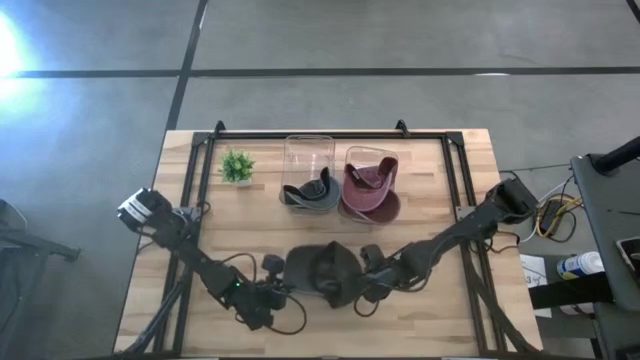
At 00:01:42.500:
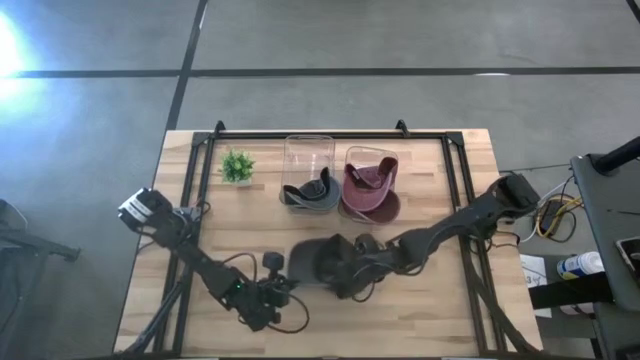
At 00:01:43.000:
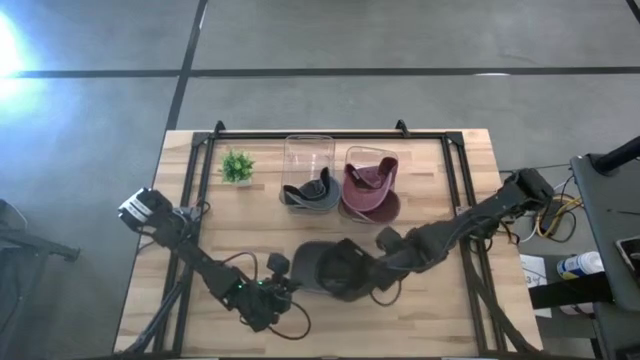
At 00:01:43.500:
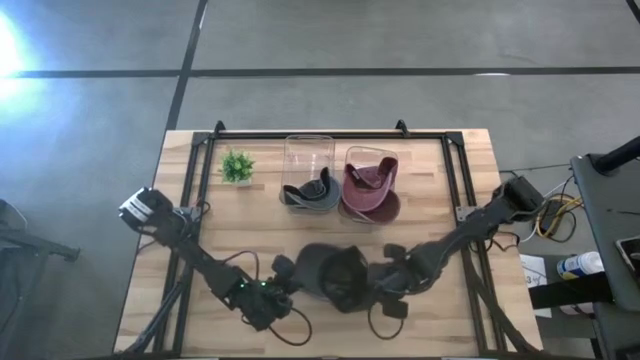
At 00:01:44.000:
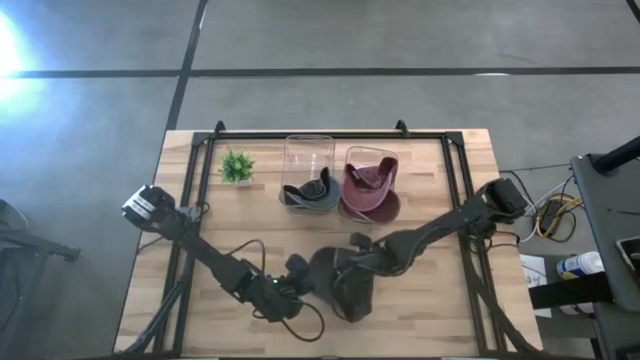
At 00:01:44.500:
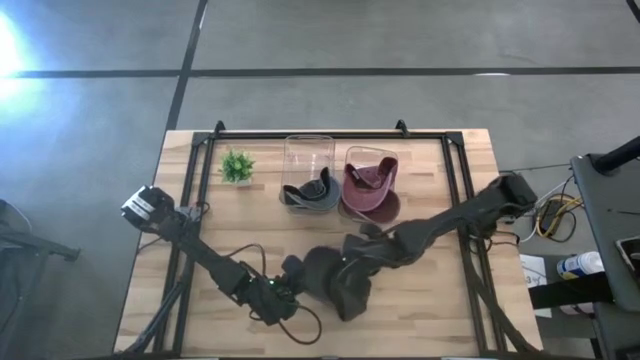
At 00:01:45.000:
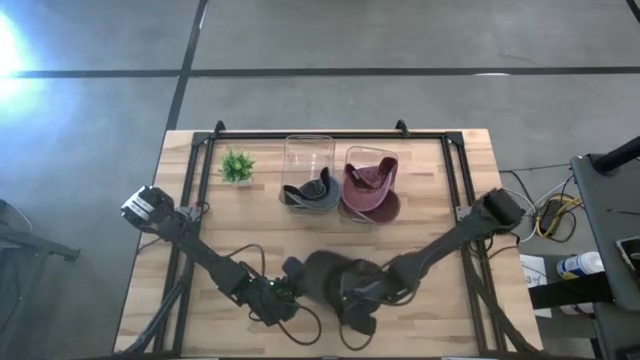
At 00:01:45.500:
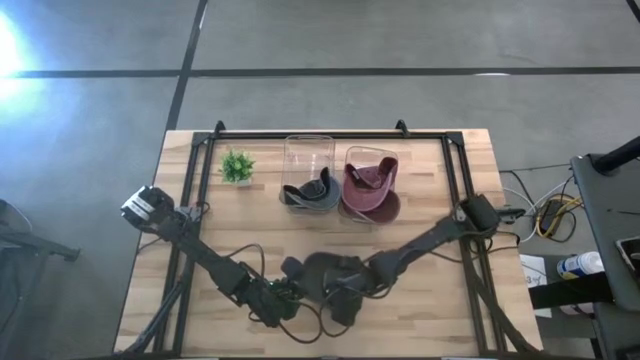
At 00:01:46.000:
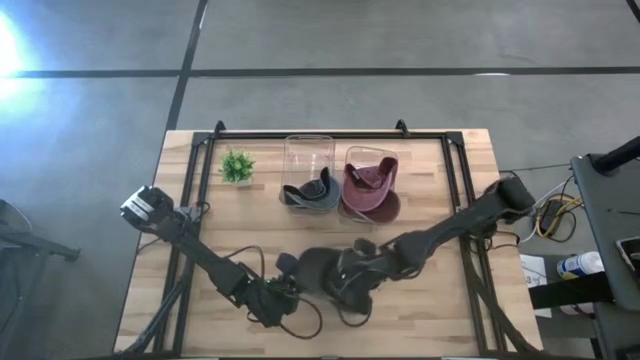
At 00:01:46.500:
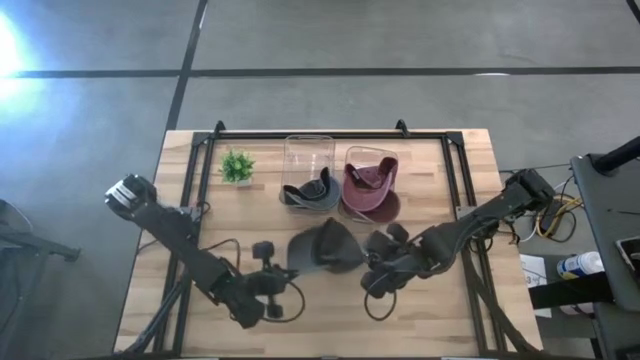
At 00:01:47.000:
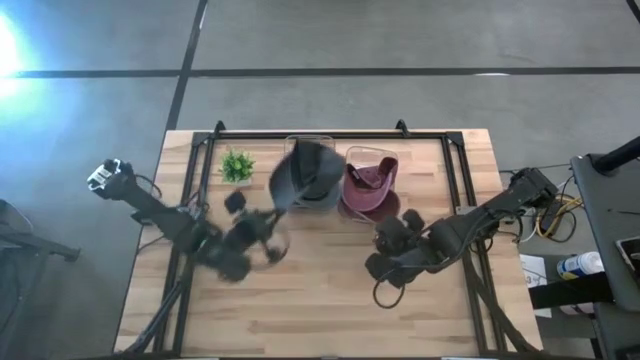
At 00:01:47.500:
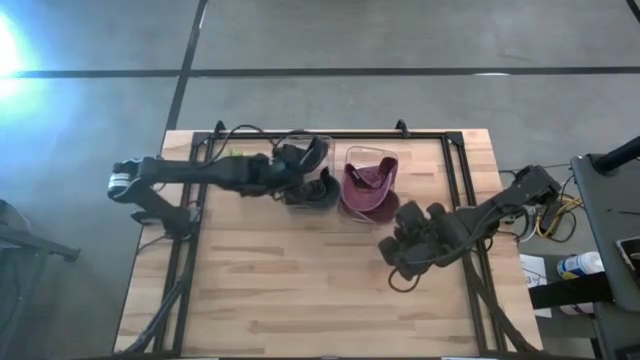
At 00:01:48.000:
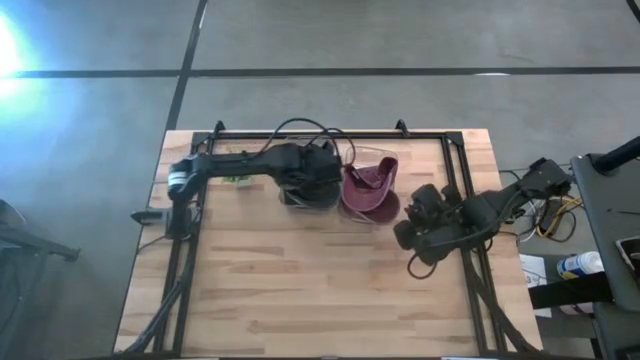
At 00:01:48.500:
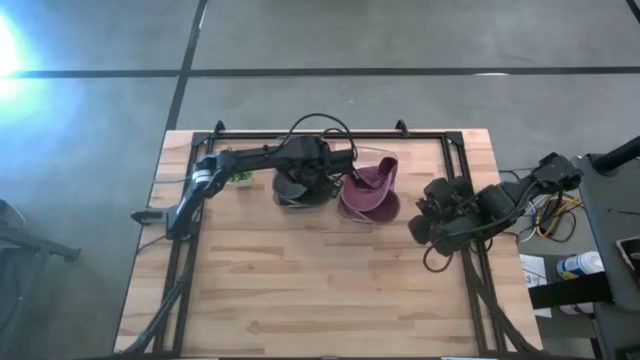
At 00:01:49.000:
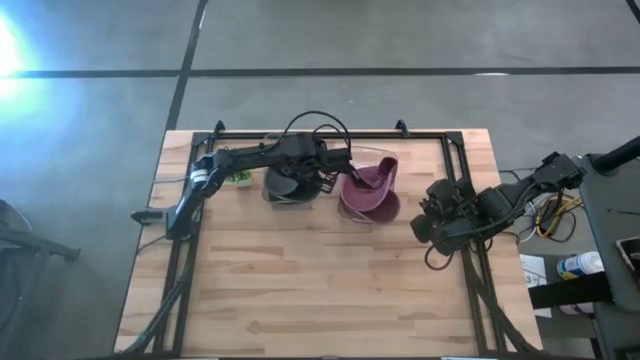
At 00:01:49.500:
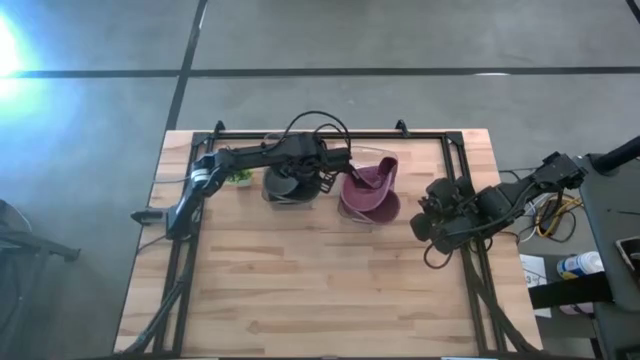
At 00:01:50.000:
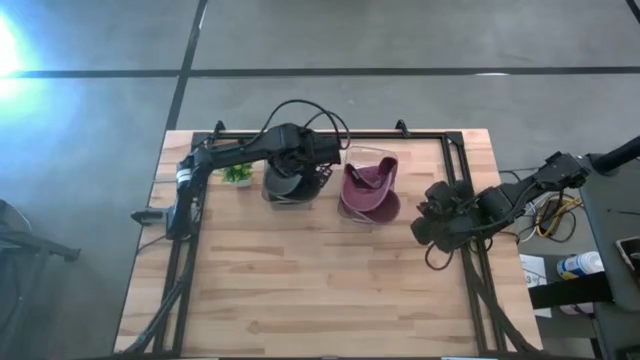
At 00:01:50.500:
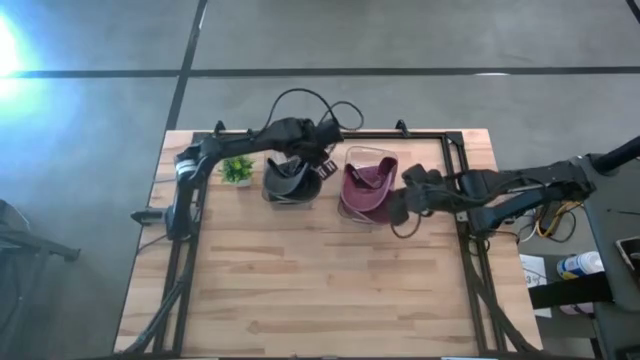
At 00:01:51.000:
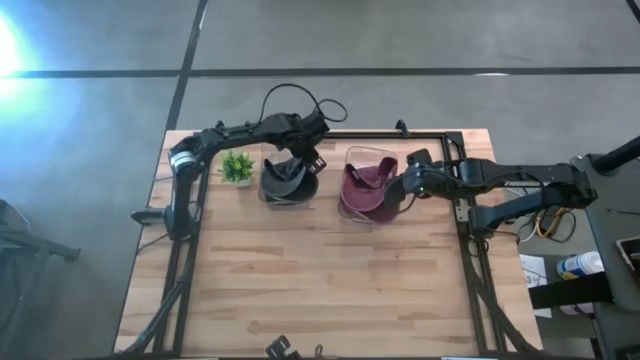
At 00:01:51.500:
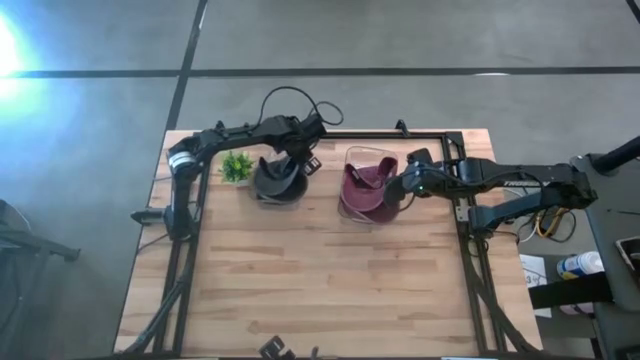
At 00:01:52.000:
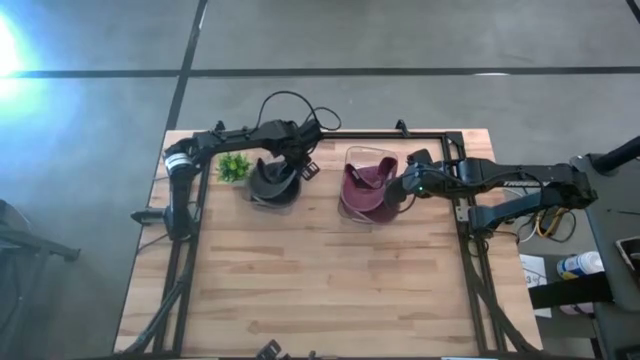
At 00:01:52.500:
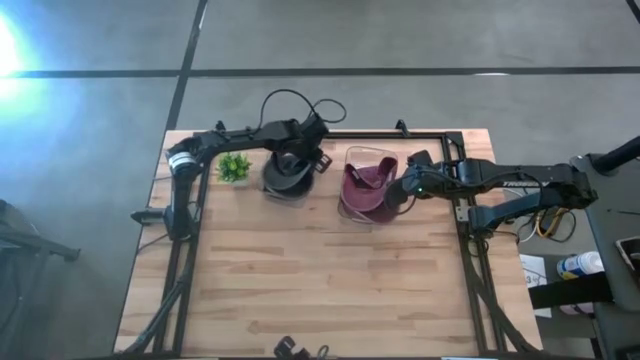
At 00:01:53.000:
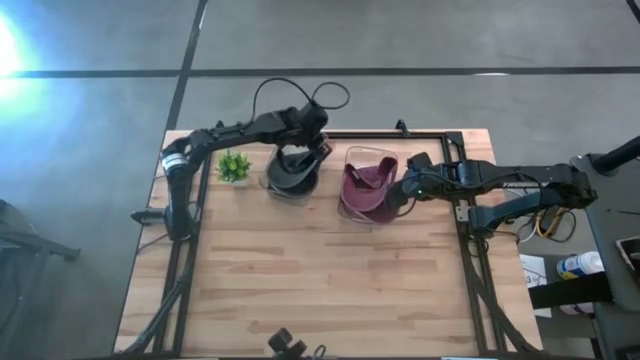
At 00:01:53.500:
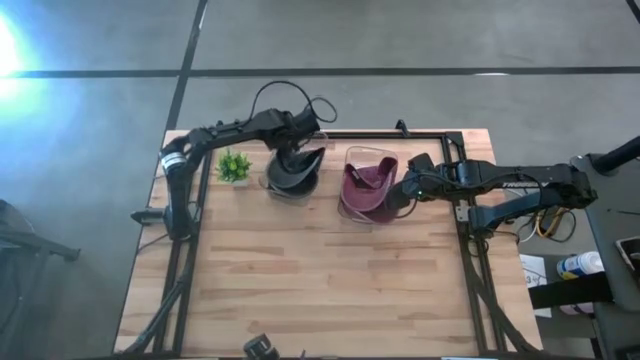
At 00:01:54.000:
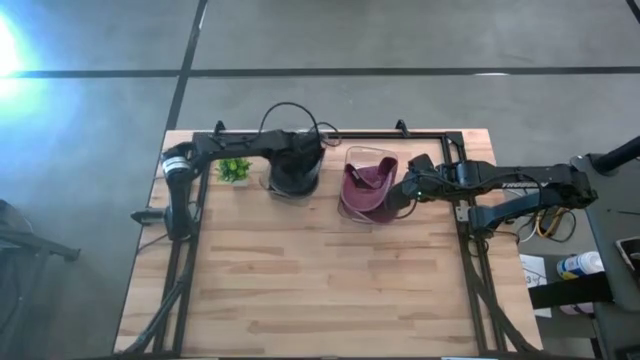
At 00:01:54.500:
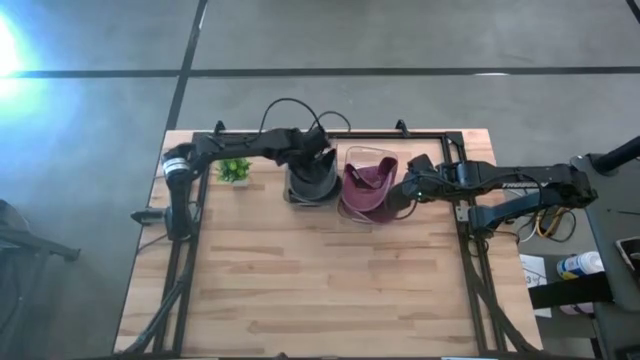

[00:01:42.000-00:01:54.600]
Task: Pick & Place hat
Put the black cap into the left transparent bin

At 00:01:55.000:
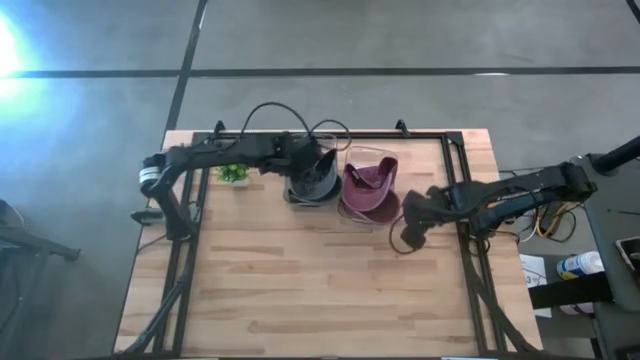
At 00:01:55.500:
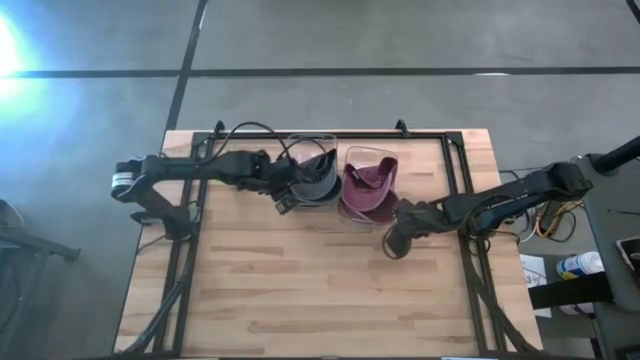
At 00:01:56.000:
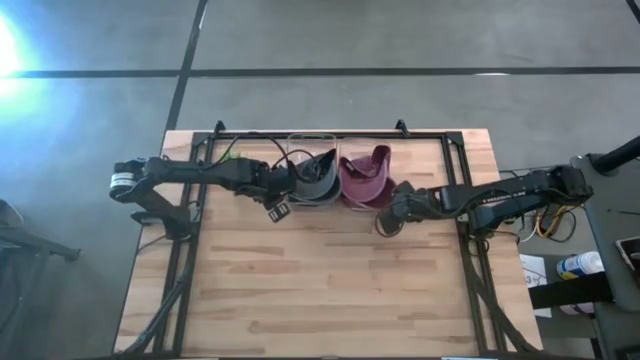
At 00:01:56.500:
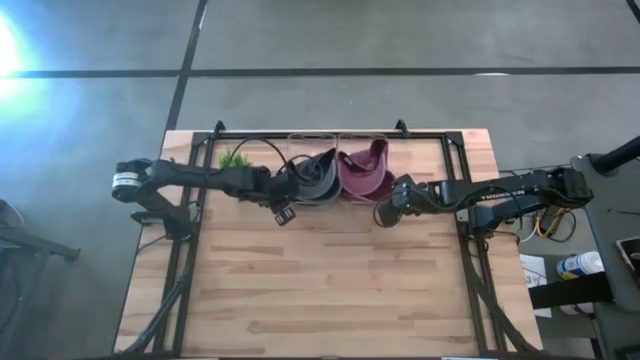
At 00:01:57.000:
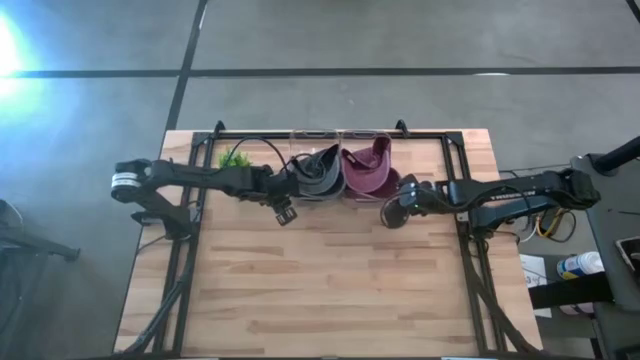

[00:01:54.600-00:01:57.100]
Adjust the transparent bins

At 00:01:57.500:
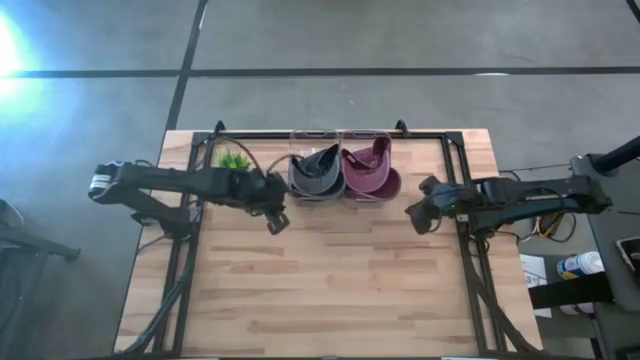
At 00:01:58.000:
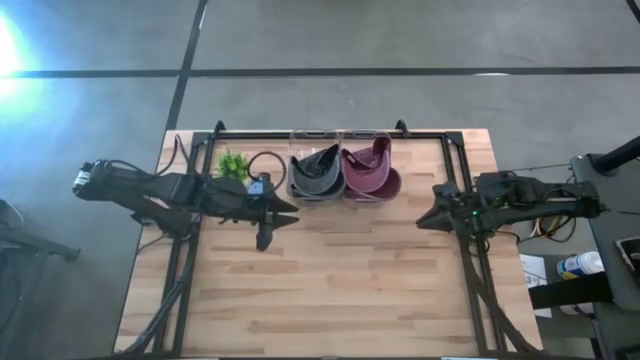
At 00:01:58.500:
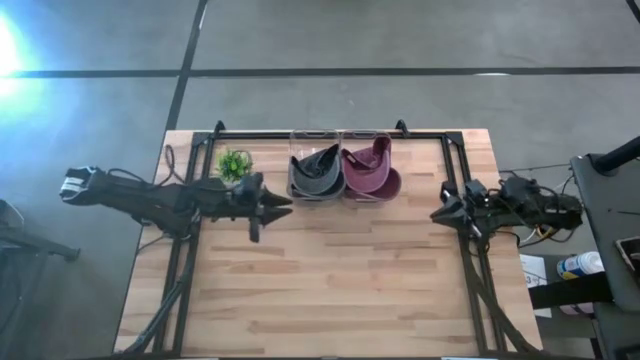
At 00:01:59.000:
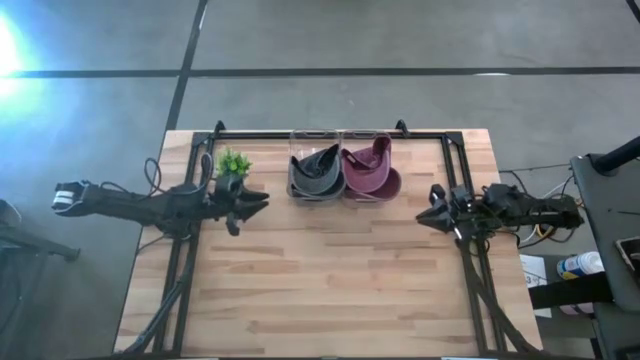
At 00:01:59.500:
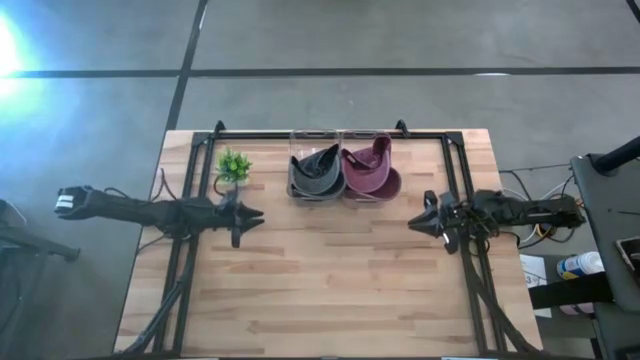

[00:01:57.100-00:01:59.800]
Return to Home Position

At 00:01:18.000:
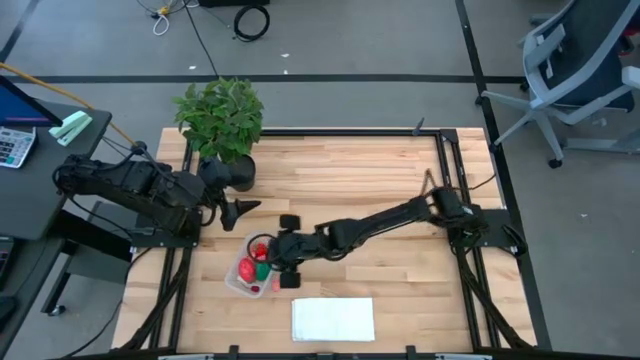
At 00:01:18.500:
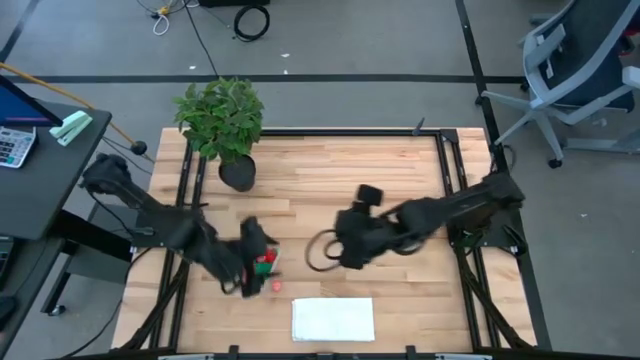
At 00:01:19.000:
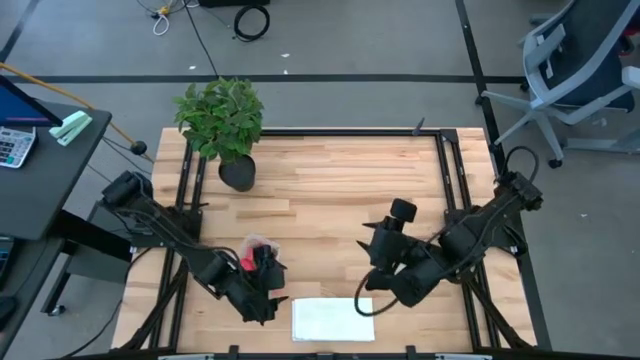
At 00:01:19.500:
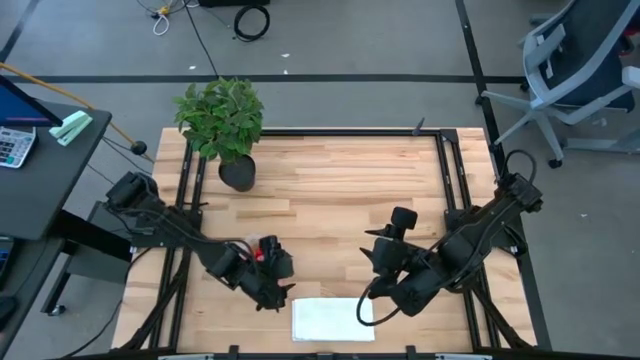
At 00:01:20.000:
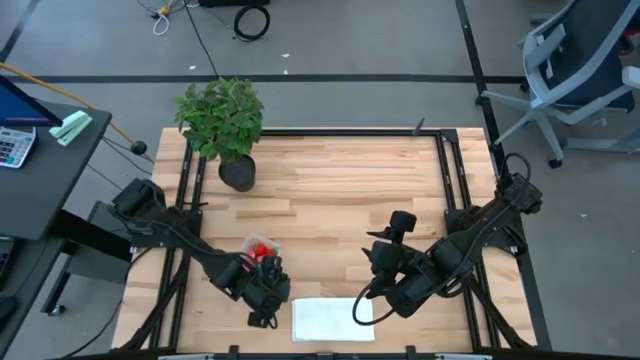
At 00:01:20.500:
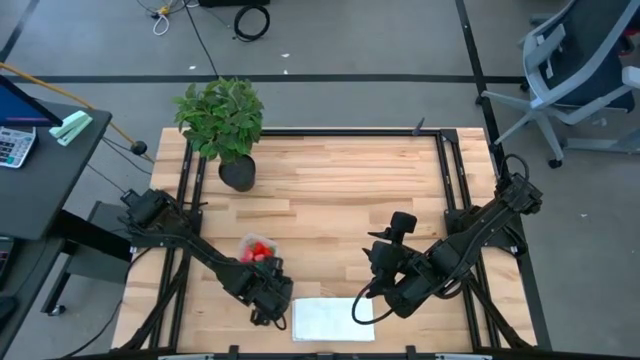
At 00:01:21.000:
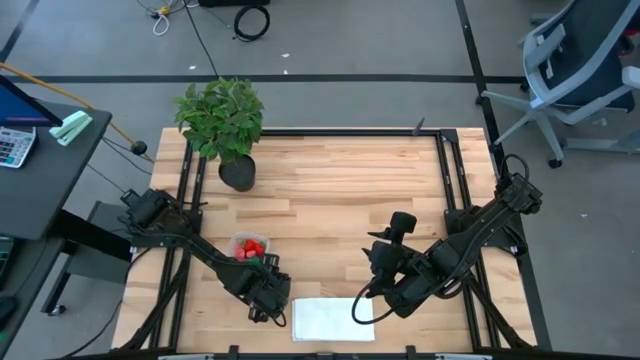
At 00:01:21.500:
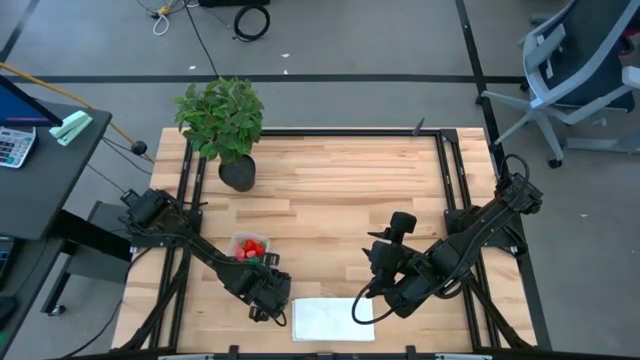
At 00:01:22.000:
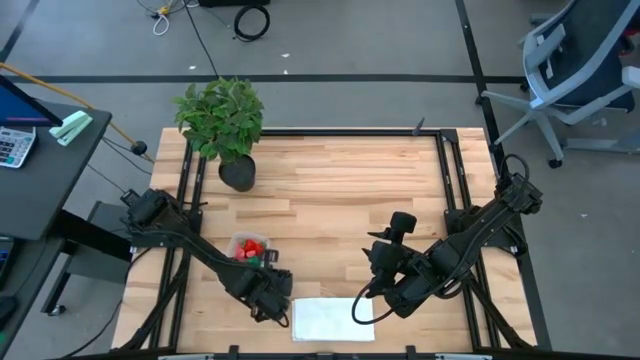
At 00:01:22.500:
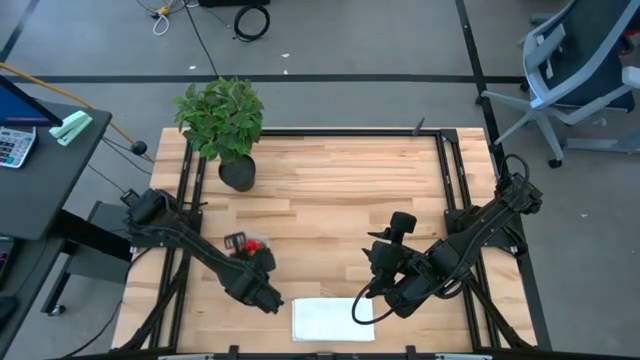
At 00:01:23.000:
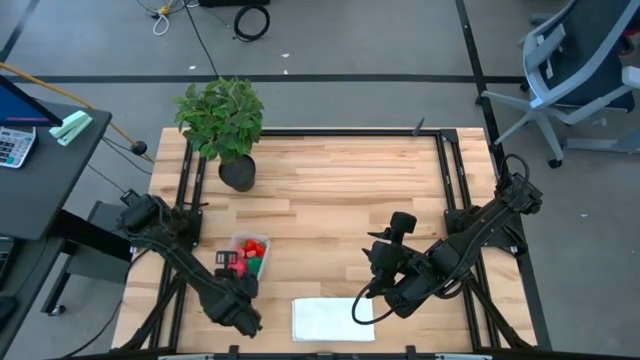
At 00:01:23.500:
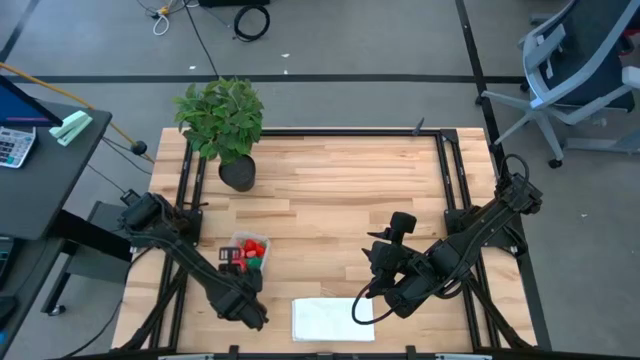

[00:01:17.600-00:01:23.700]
Task: Pick and placing Produce into tupperware
Put the pink peach into the transparent bin
